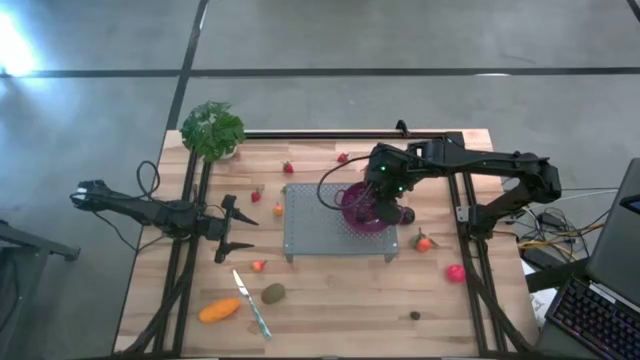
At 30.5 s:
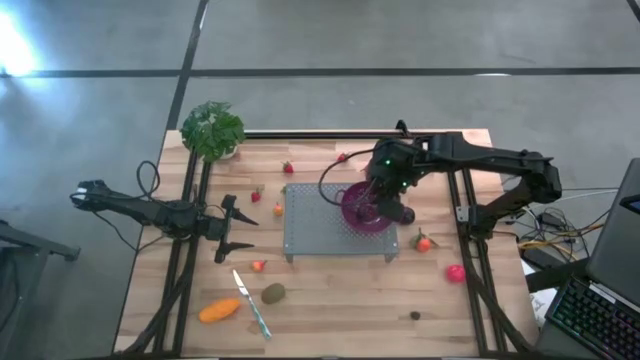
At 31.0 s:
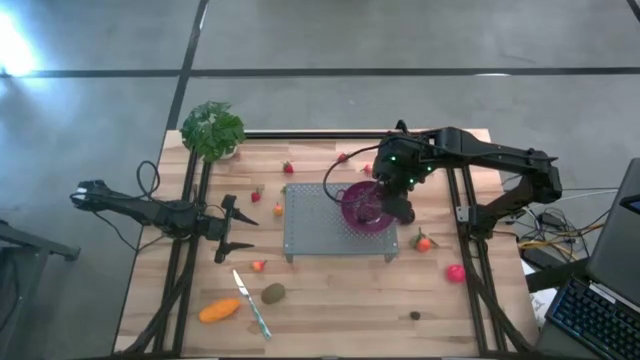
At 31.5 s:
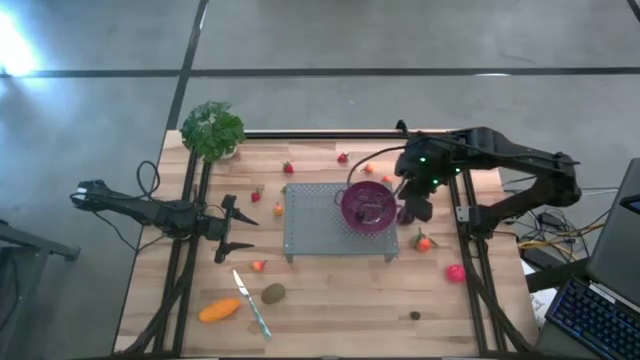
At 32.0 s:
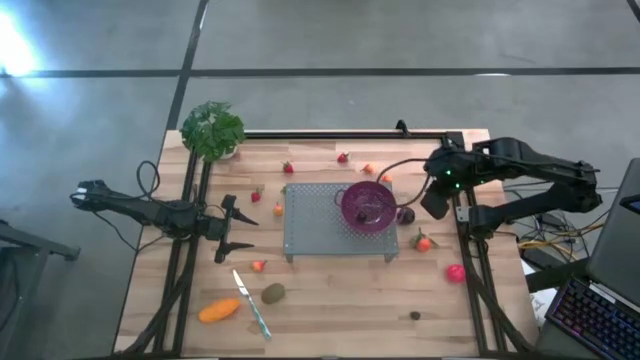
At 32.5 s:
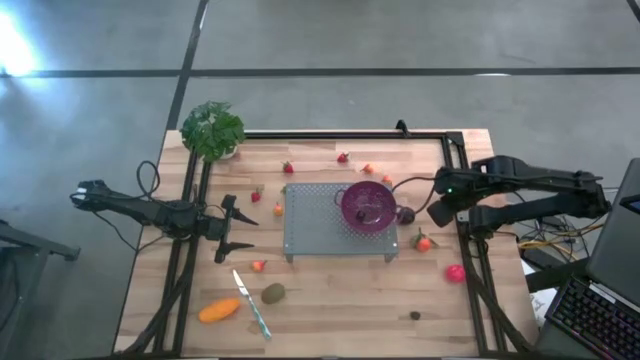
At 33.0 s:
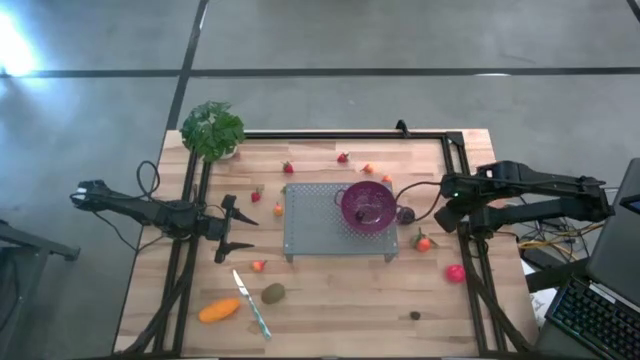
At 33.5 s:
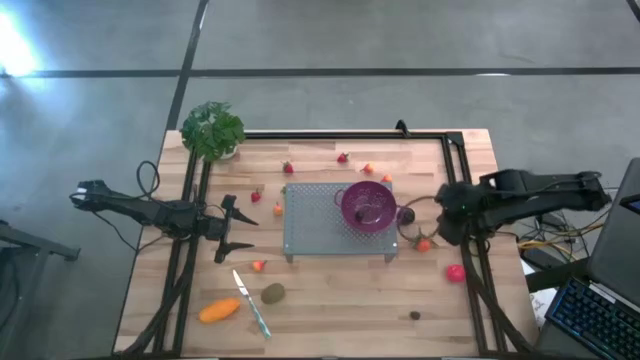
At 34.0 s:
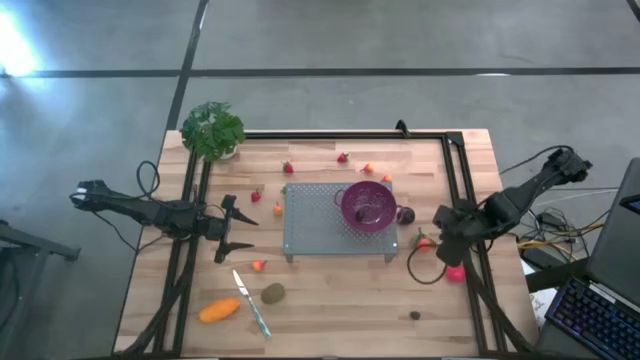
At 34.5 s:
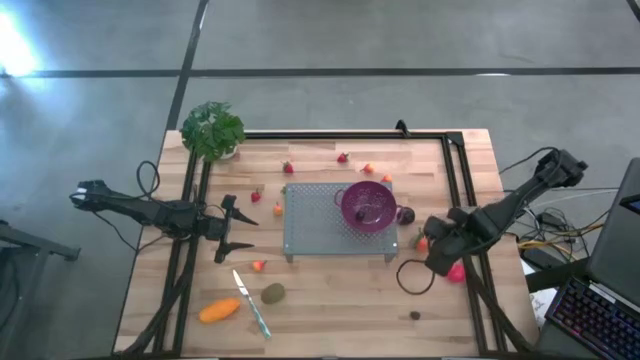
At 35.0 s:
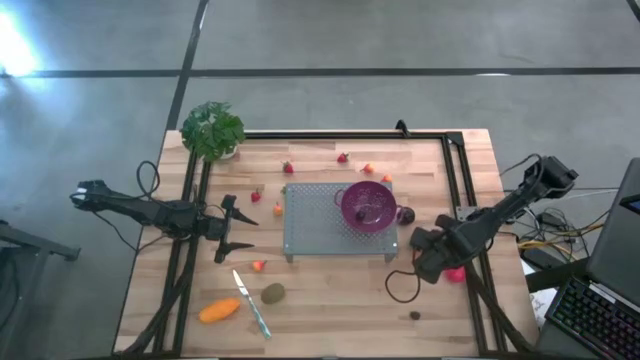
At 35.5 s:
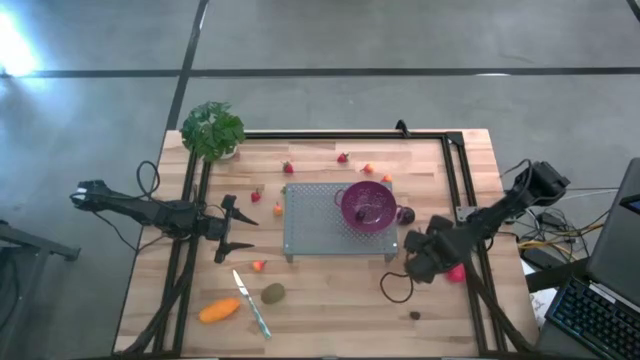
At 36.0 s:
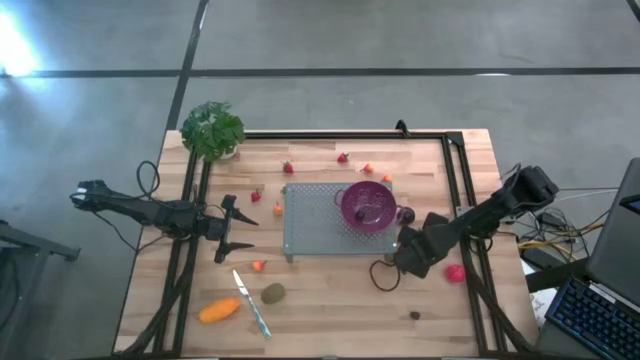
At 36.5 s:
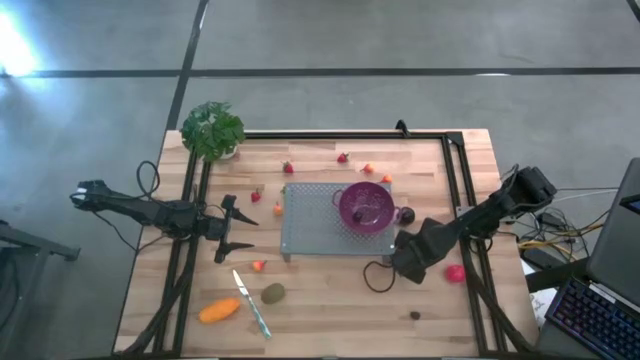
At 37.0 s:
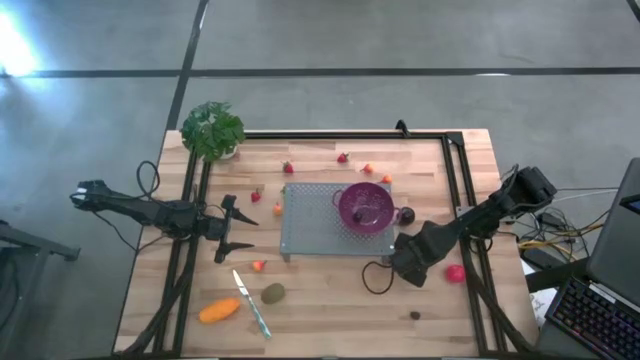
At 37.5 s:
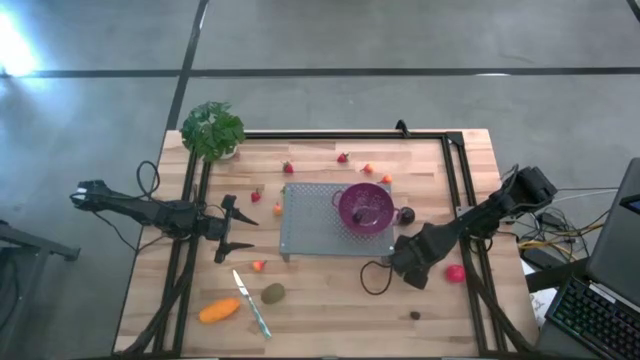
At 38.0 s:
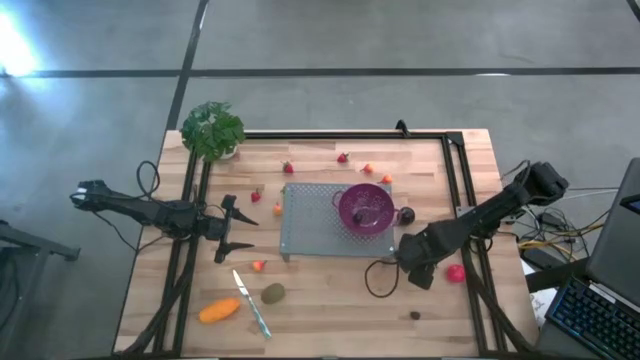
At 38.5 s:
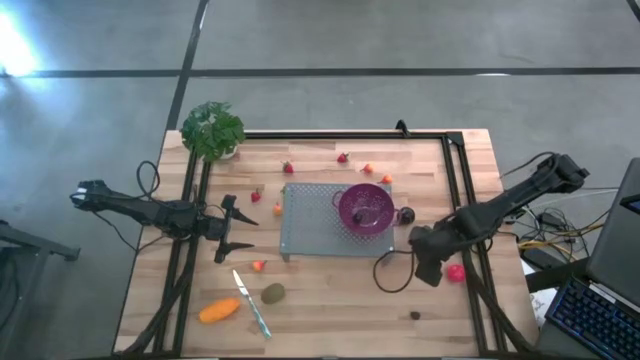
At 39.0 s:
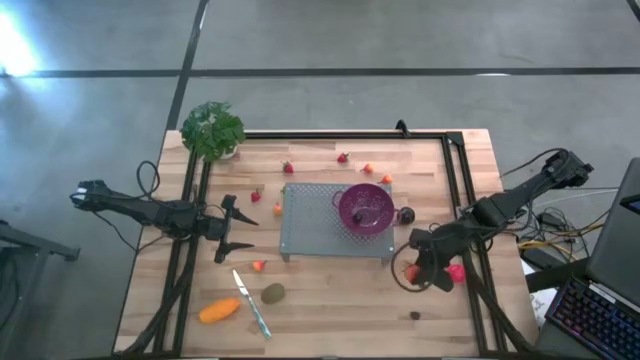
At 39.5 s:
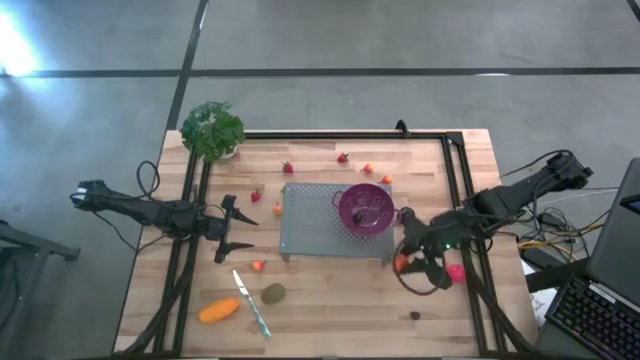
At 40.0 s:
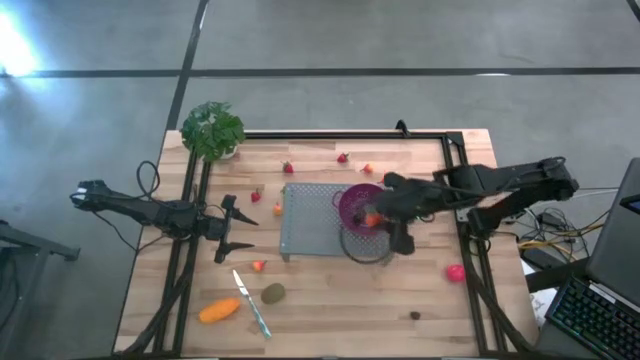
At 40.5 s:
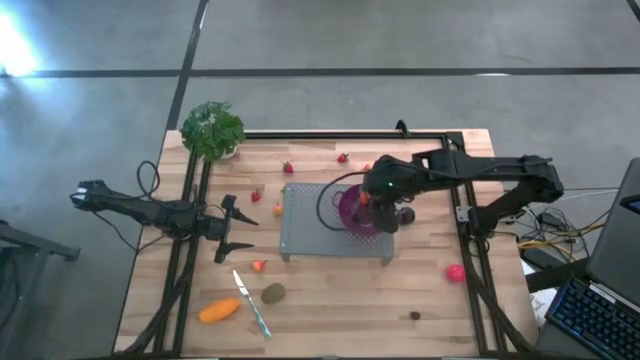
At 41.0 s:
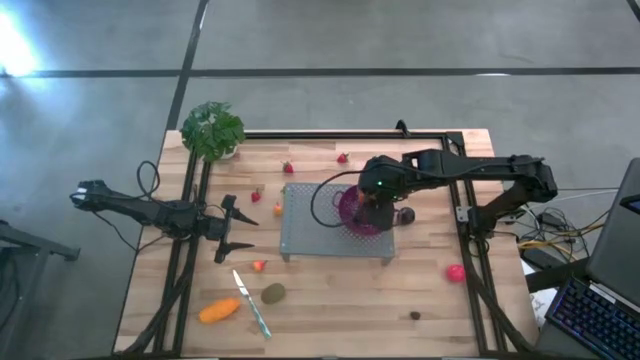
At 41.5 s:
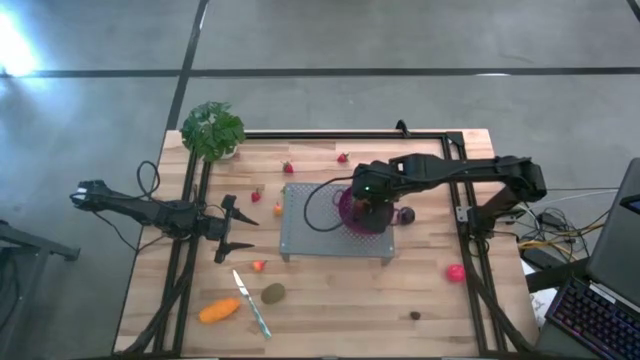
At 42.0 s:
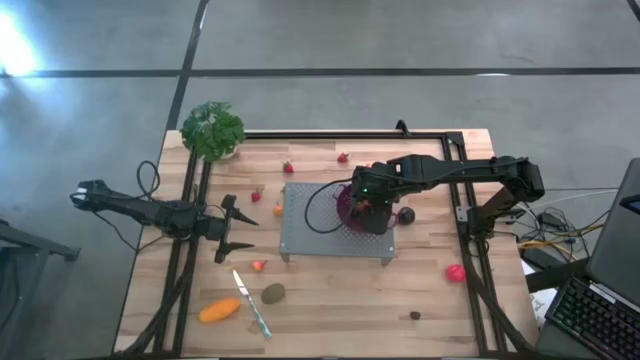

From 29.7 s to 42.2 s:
Task: Pick & Place Fruit
Put the orange in the purple strainer bowl on the shelf

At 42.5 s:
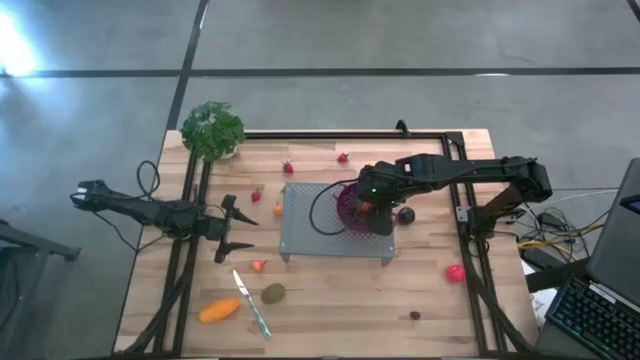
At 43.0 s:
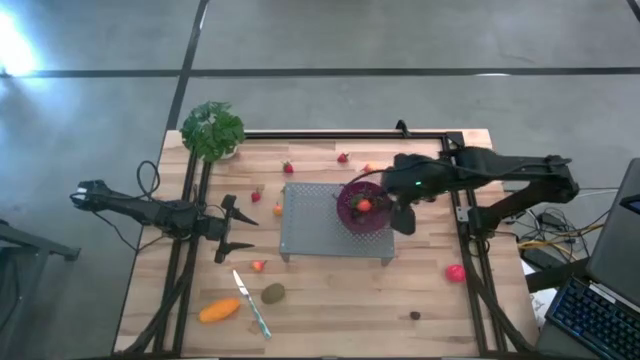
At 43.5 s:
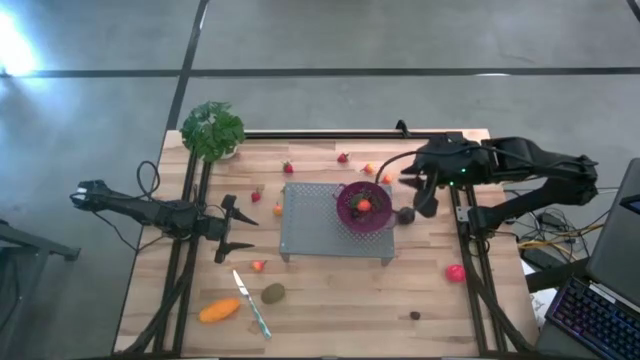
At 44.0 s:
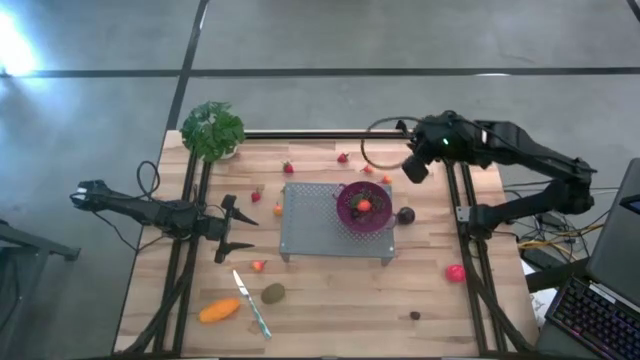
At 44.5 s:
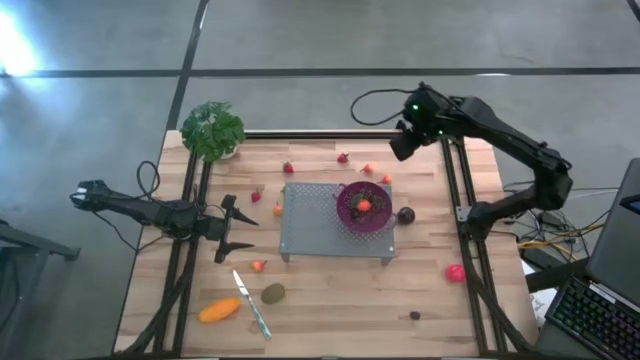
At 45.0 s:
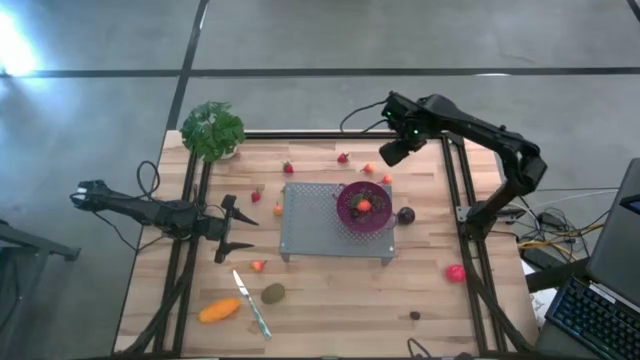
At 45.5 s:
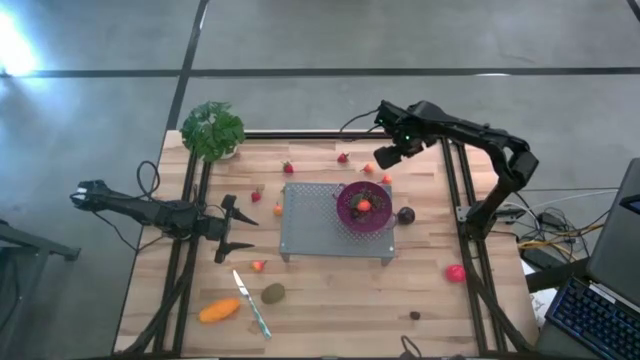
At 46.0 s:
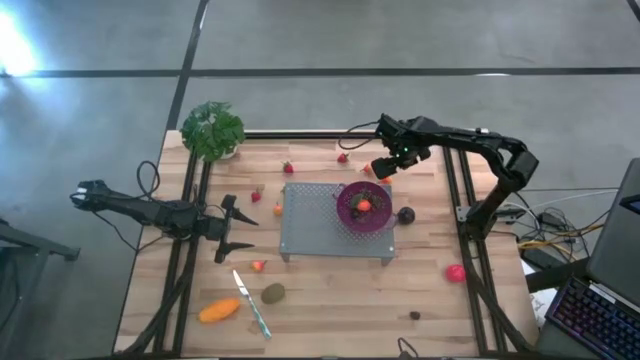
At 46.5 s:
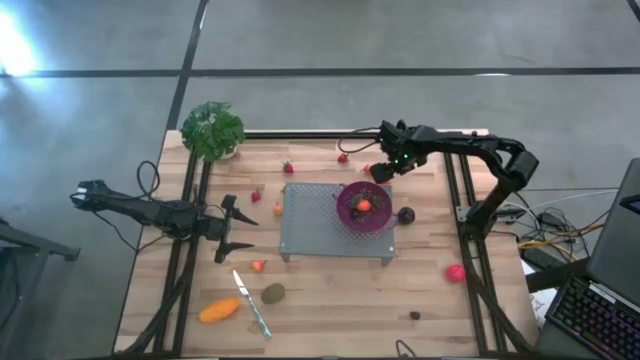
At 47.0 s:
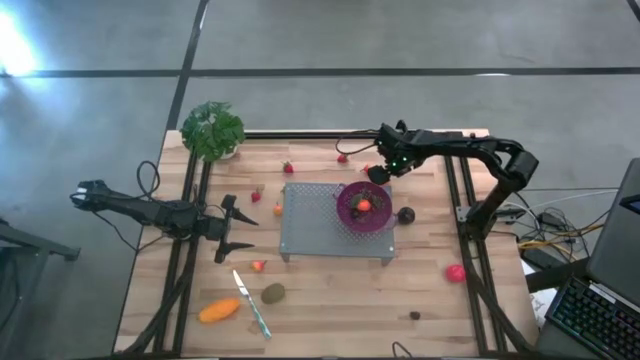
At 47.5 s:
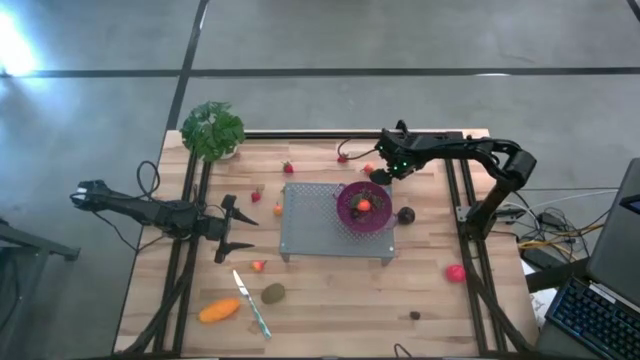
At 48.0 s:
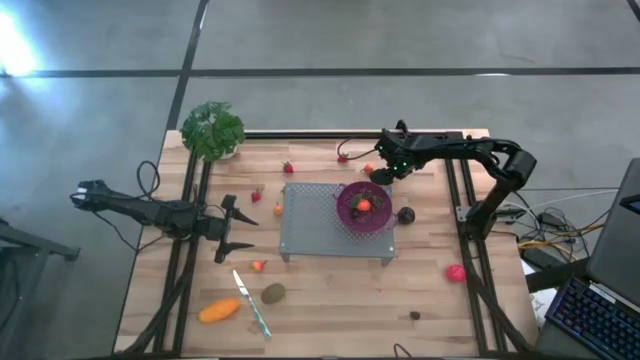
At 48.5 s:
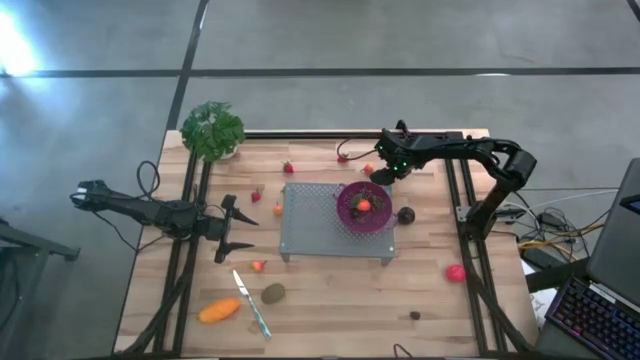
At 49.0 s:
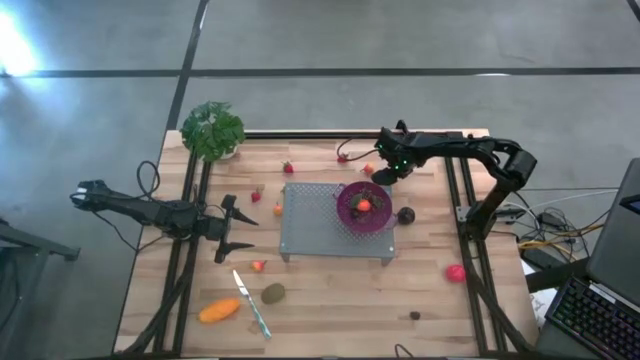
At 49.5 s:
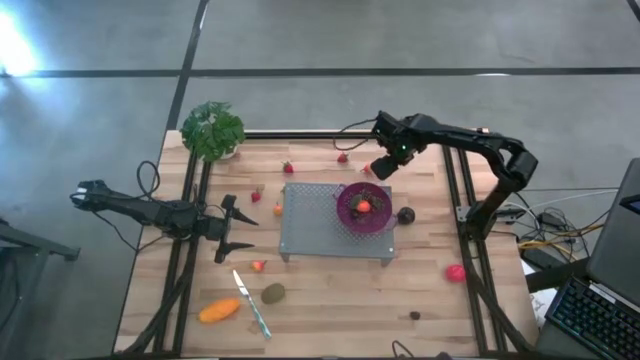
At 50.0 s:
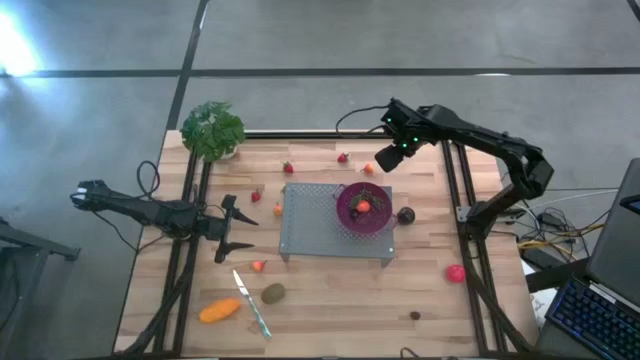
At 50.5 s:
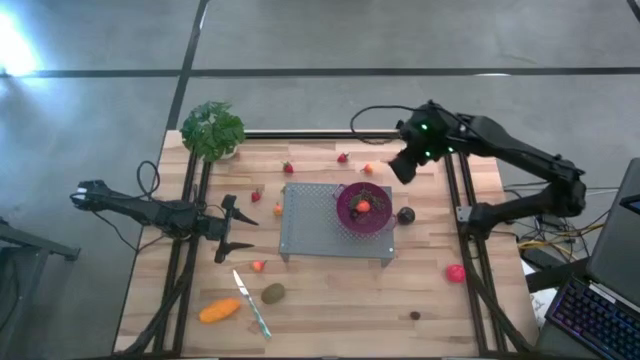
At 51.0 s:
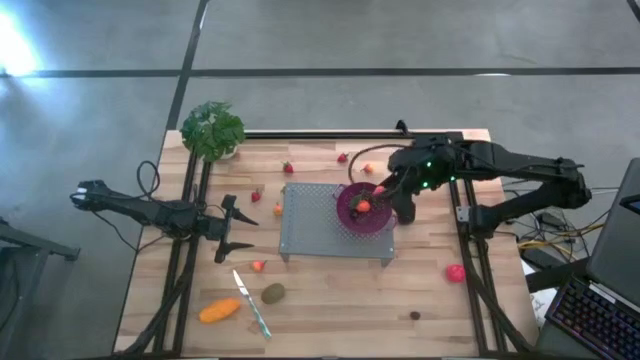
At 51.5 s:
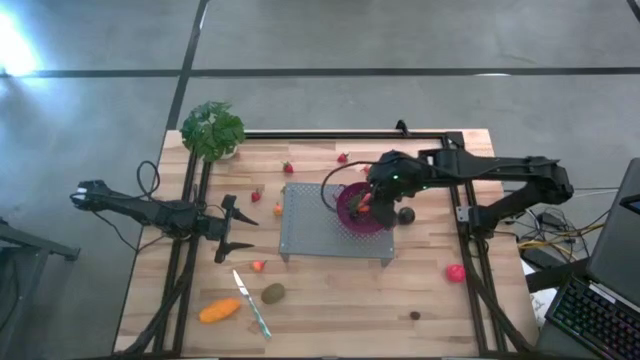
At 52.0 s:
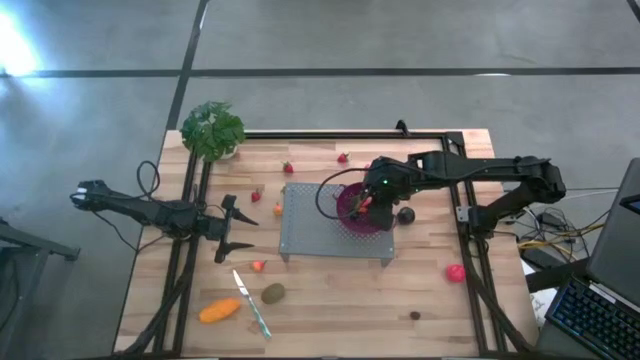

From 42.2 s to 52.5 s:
Put the pear in the purple strainer bowl on the shelf
